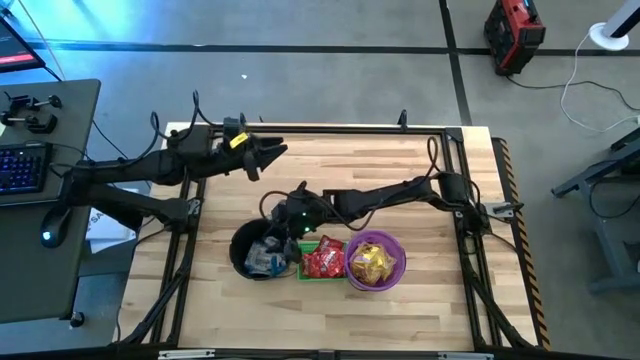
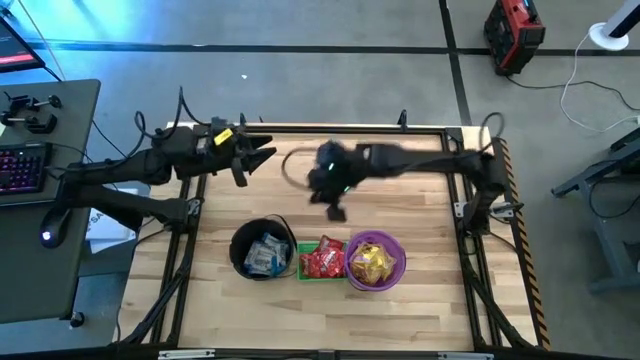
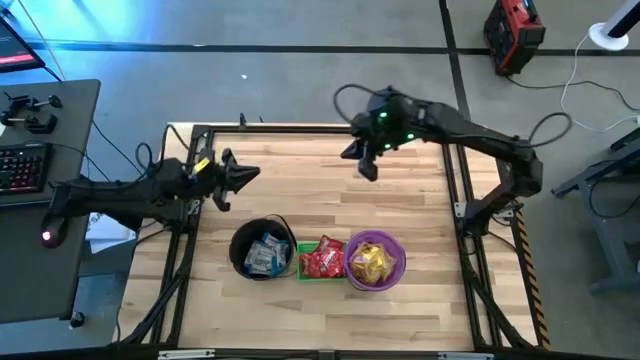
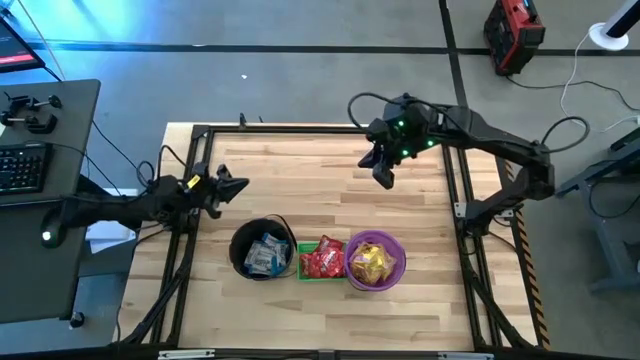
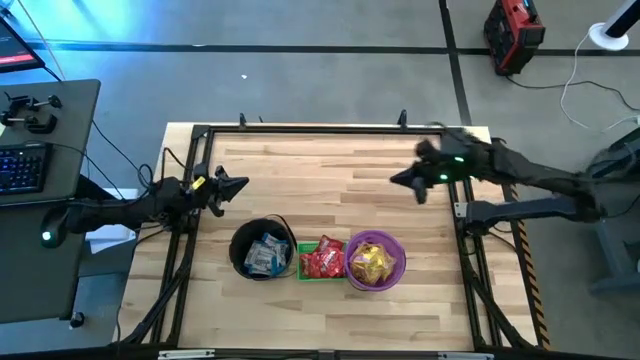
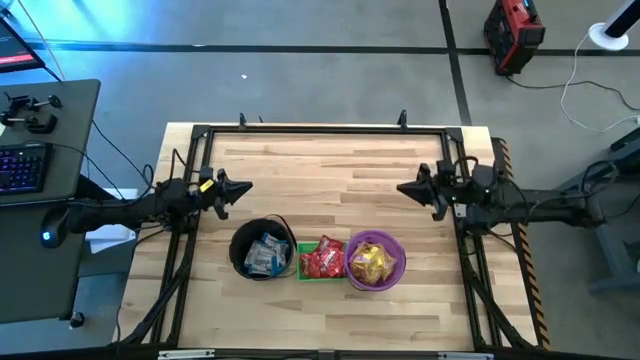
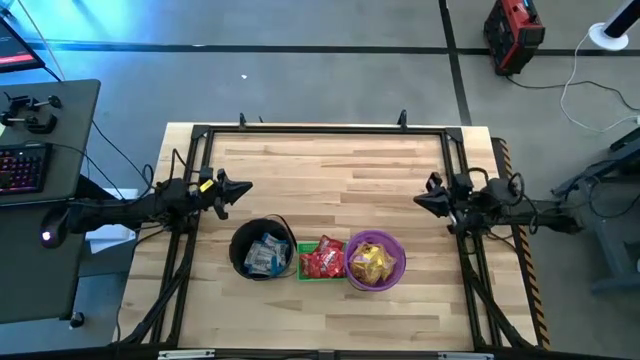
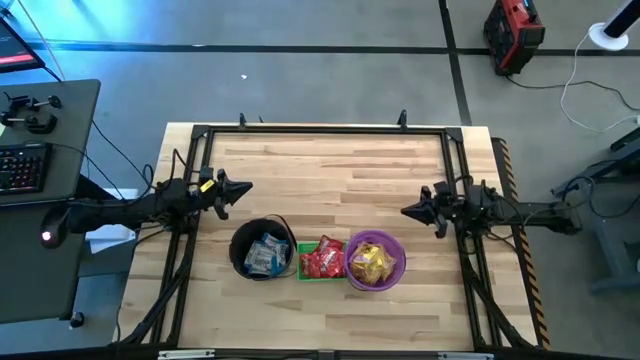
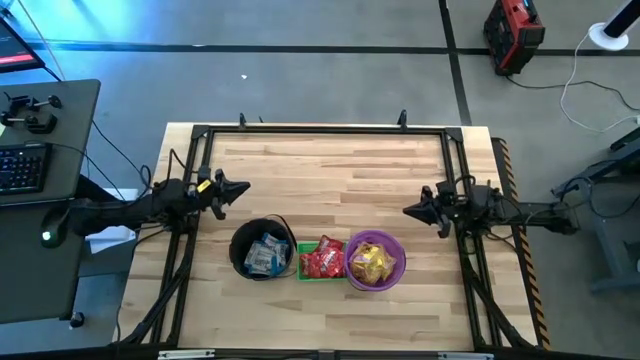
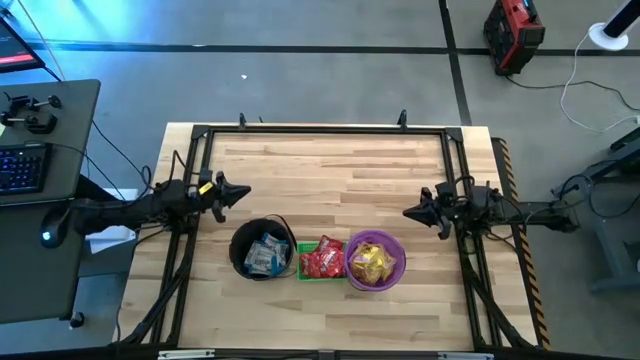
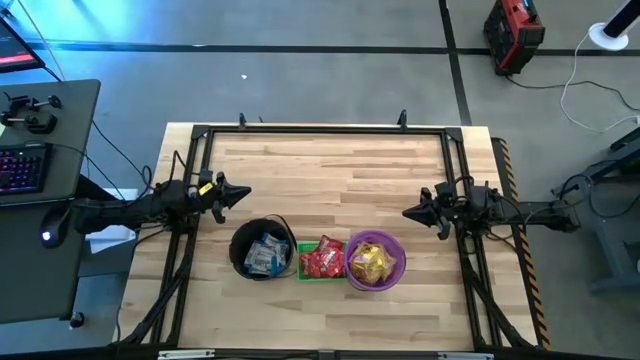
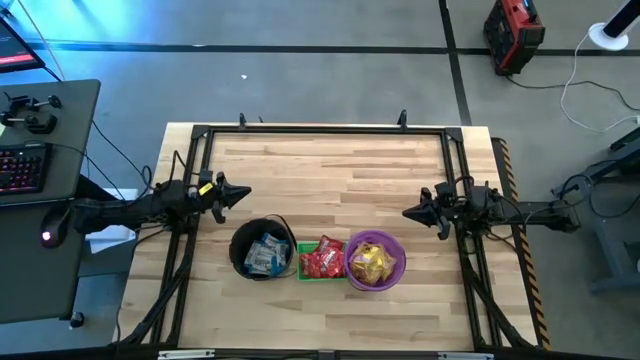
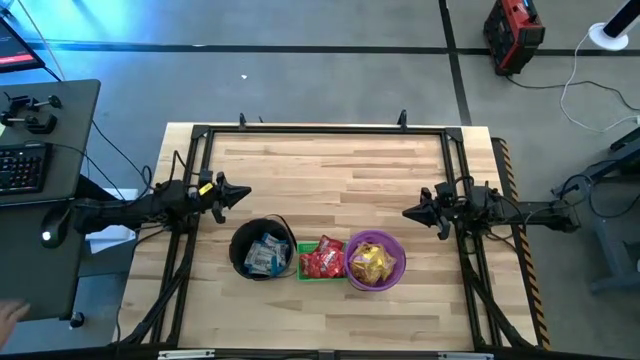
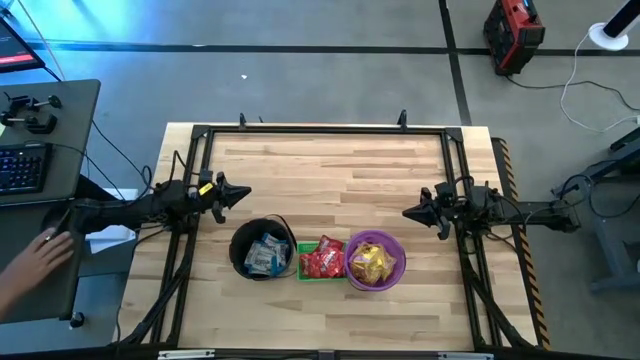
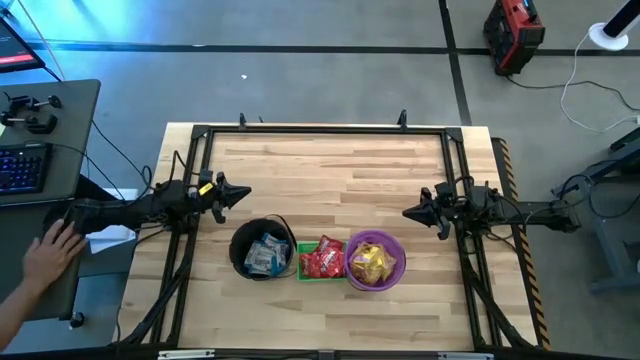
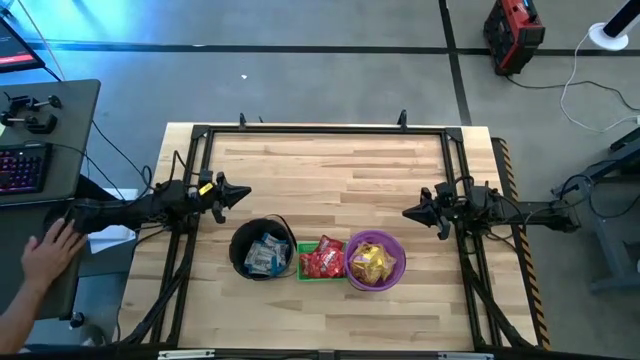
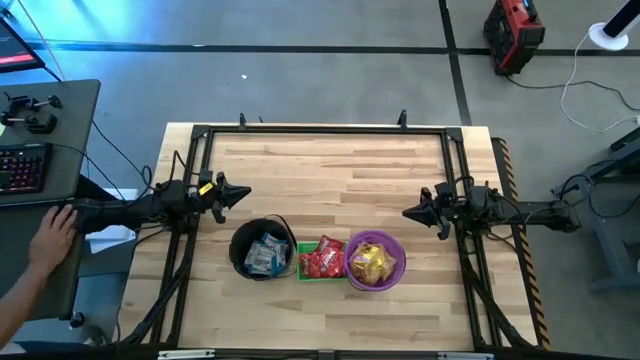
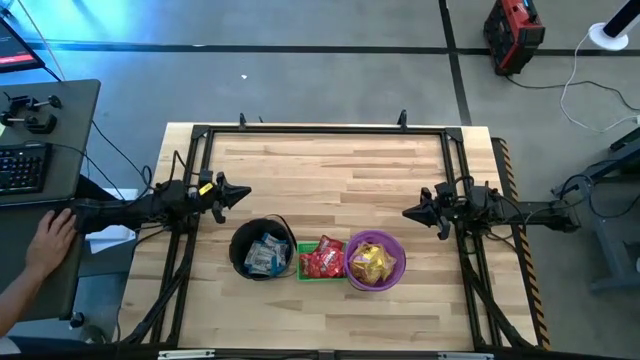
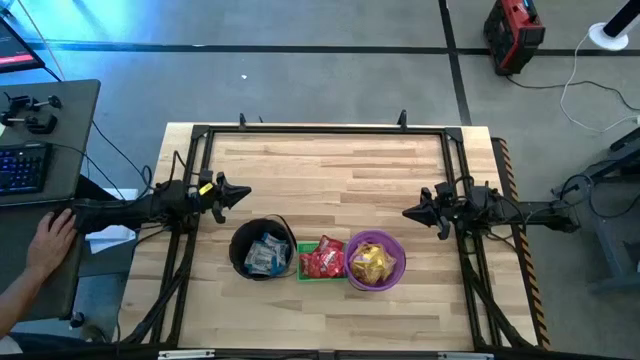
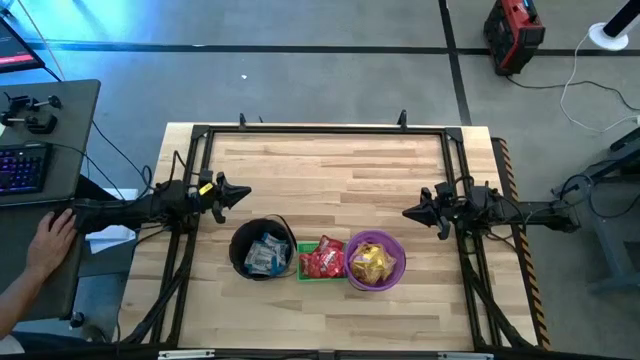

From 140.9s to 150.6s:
Task: Sort candy by brand, put in halloween buckets
Return to Home Position

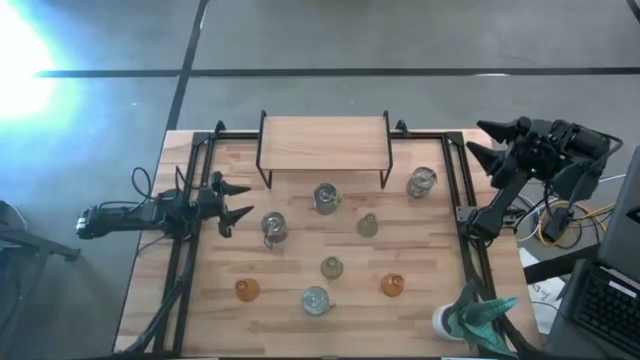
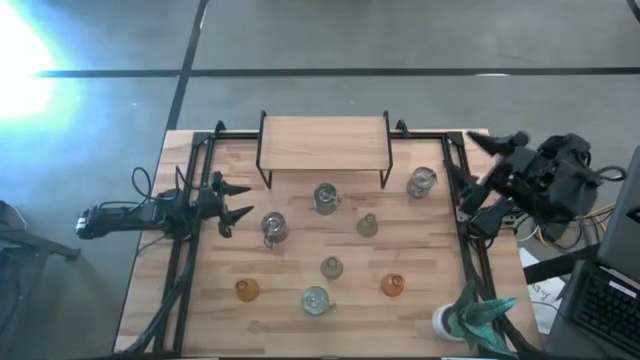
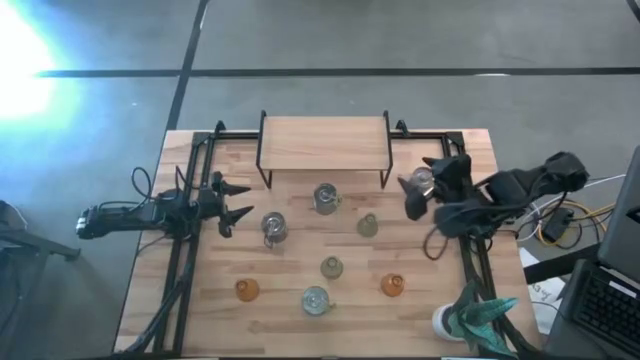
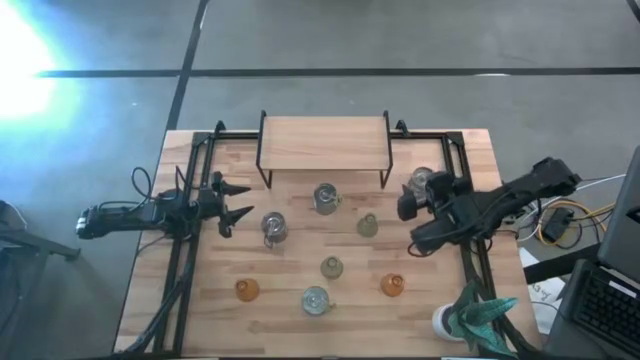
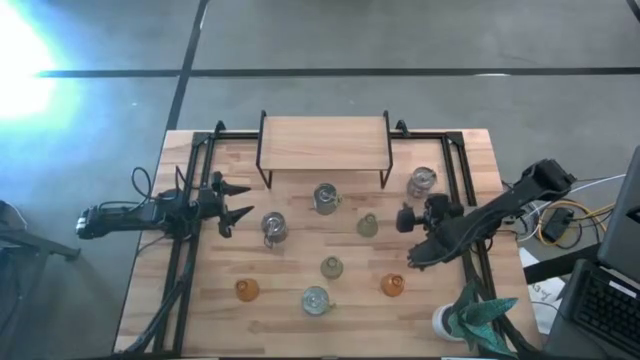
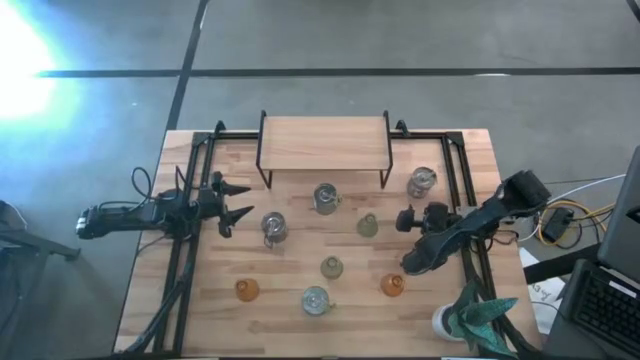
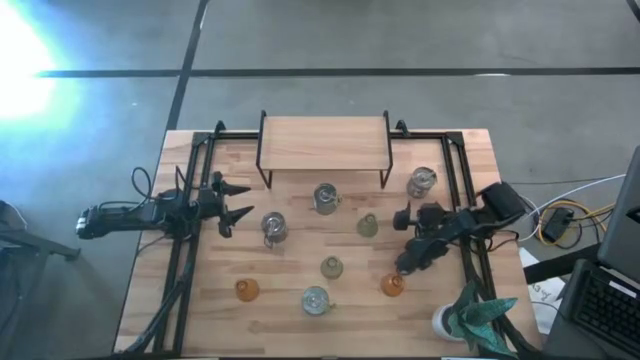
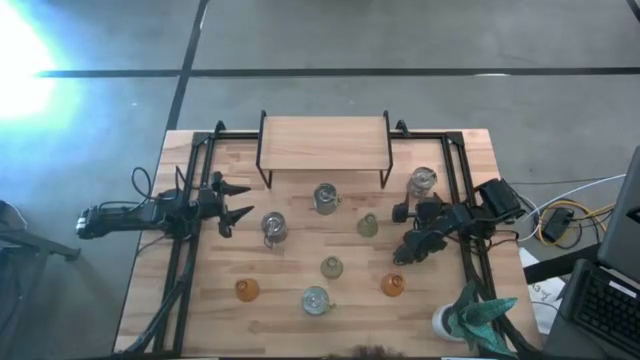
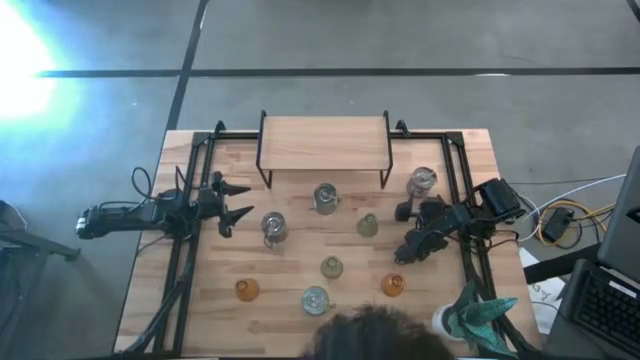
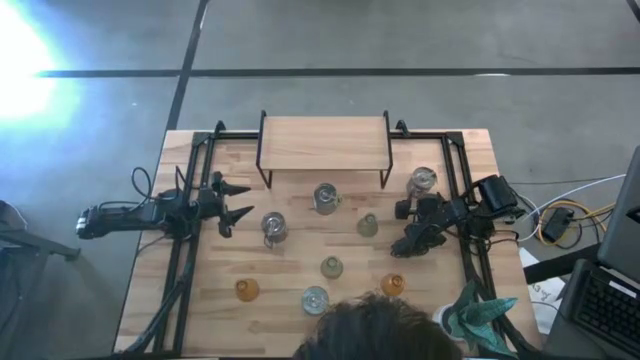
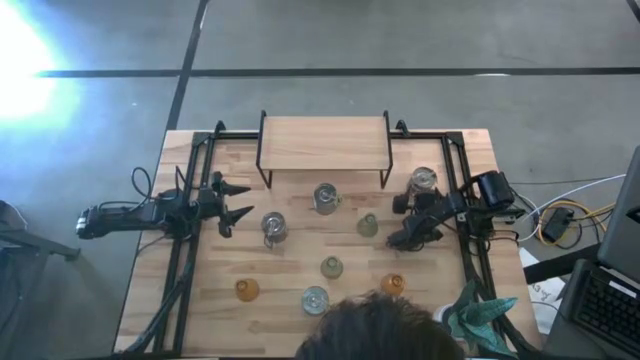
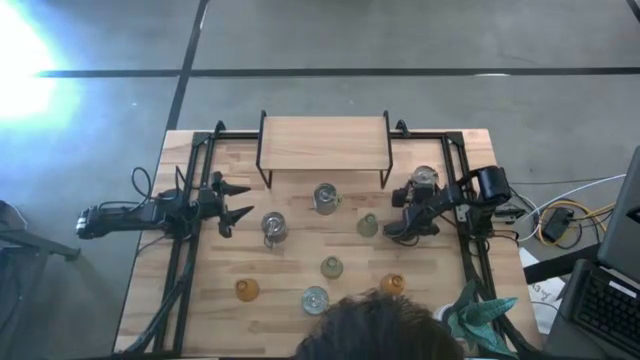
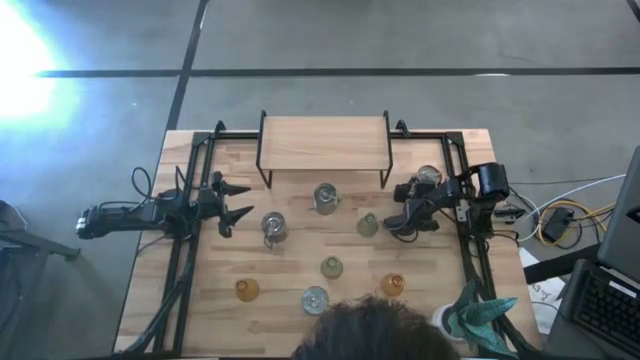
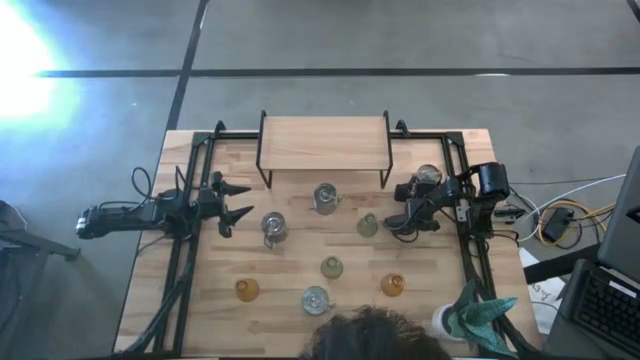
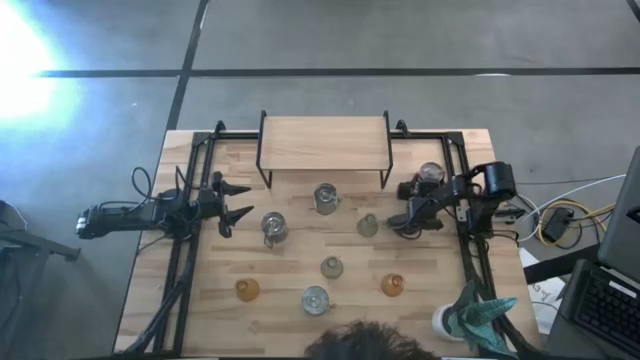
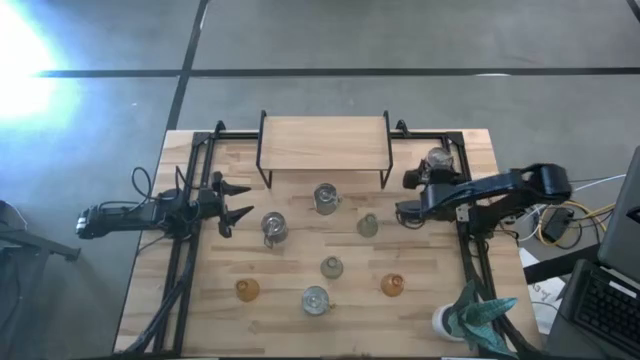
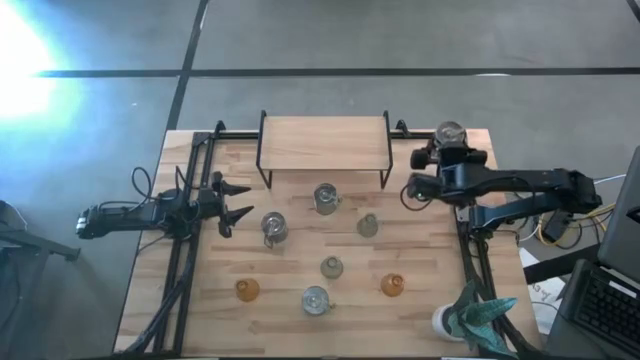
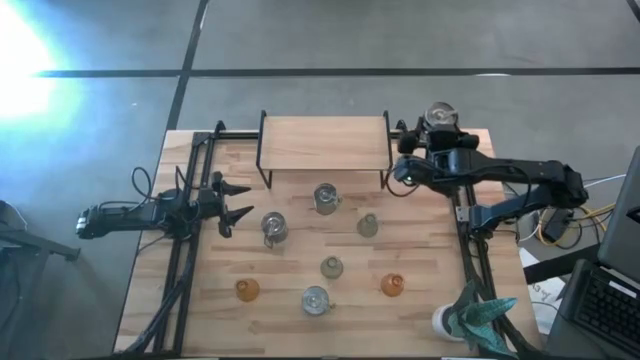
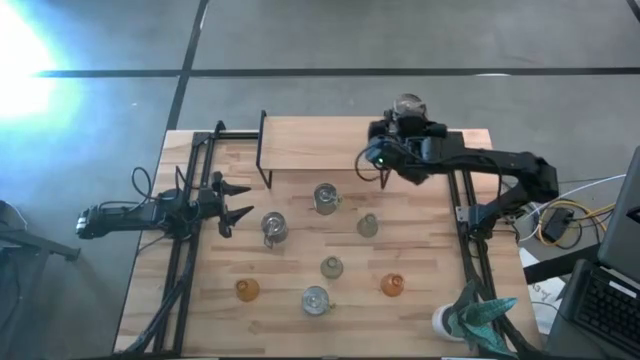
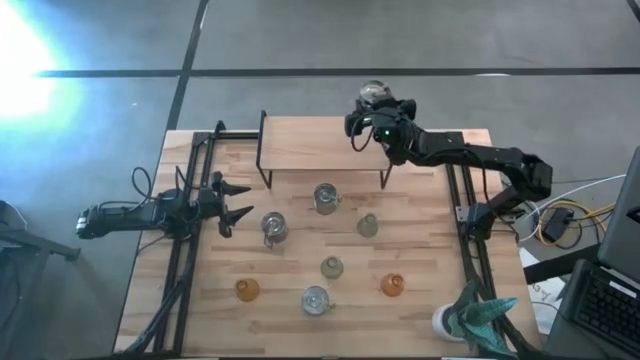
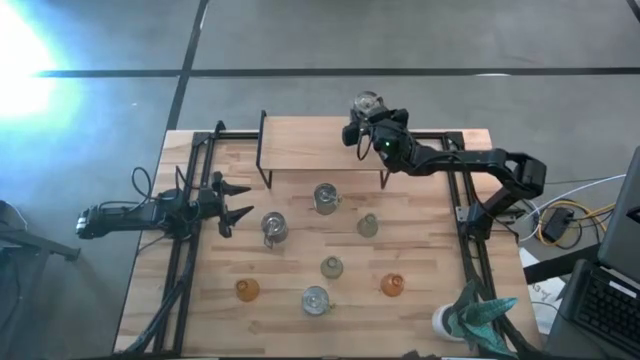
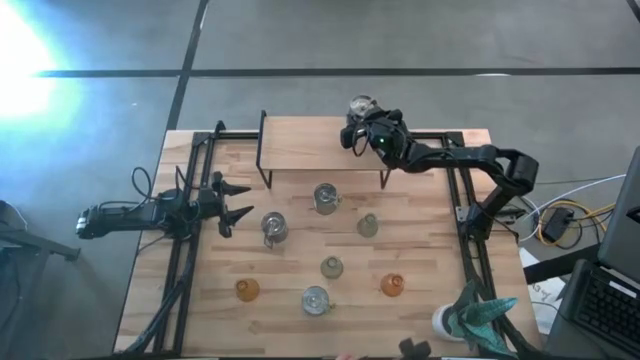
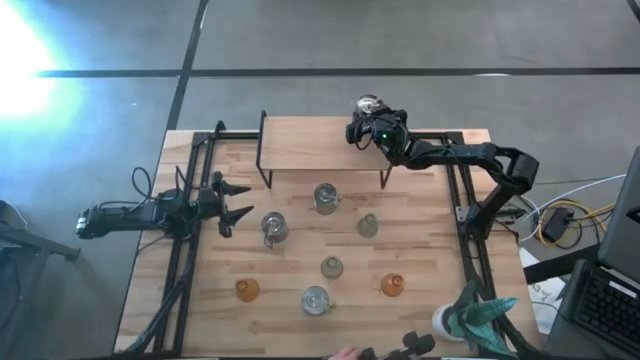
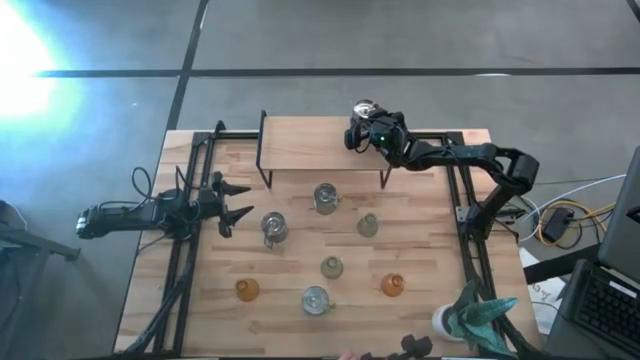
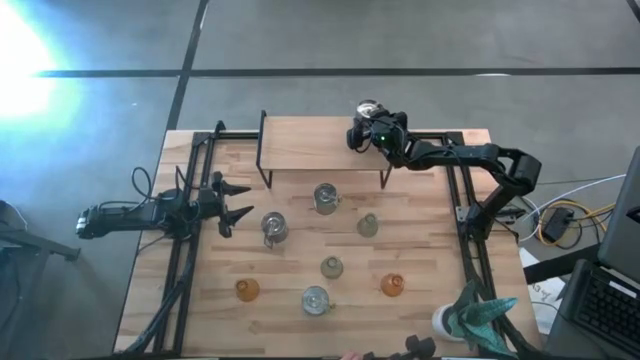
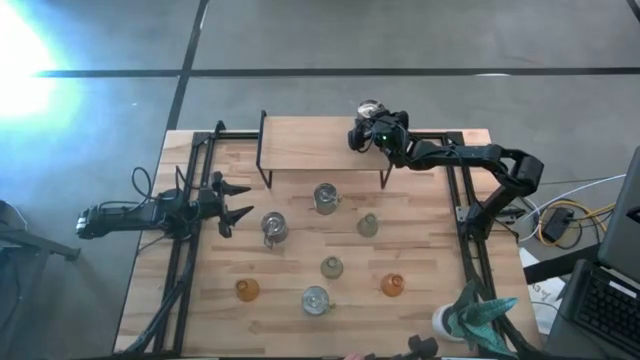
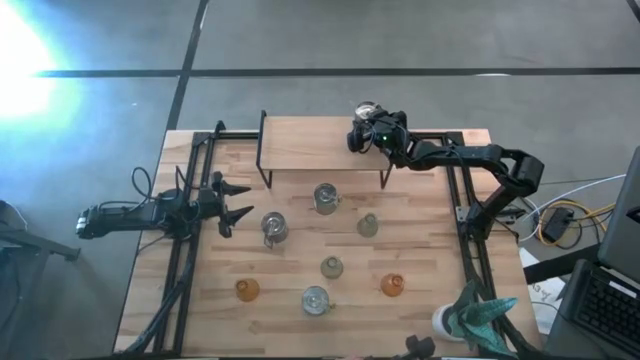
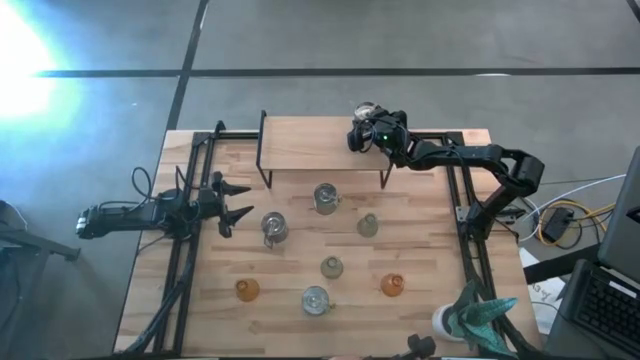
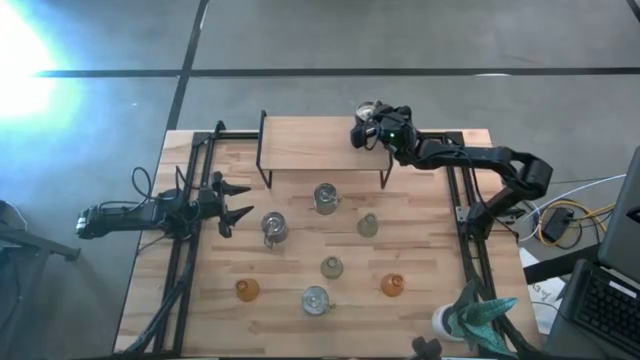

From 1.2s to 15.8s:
Task: Pick & Place candle stick holders
Put the right brown scented candle on the shelf
